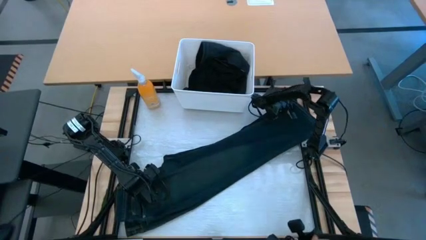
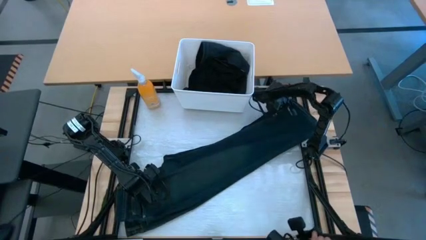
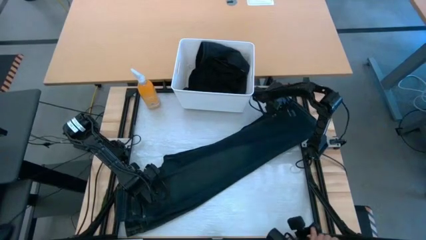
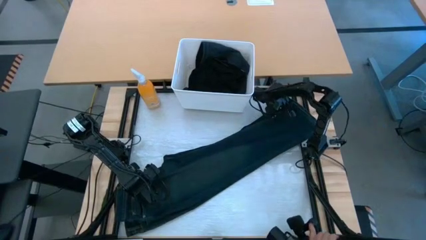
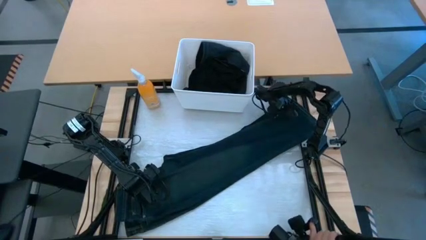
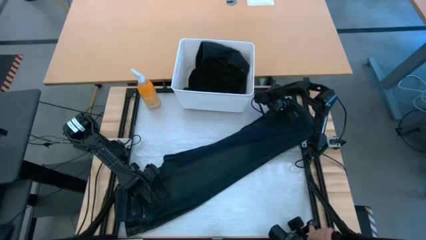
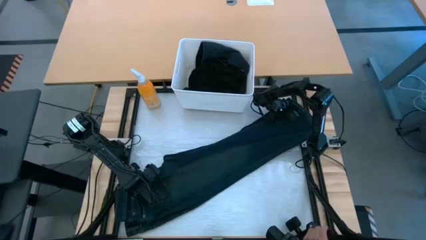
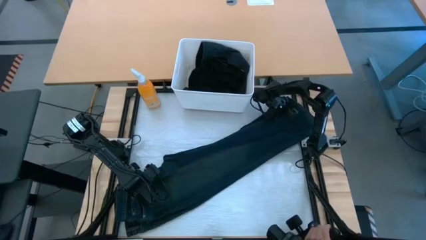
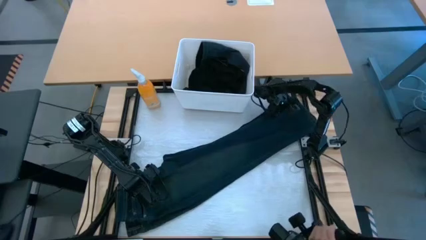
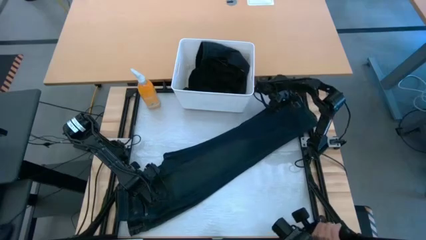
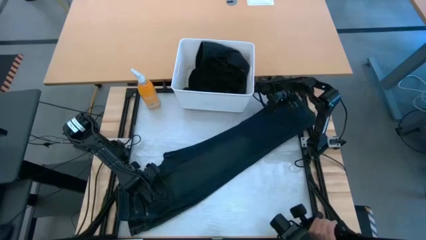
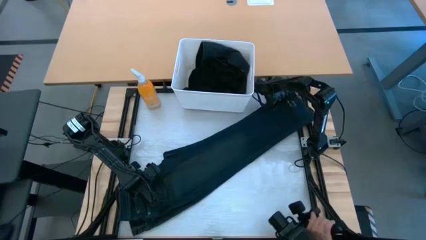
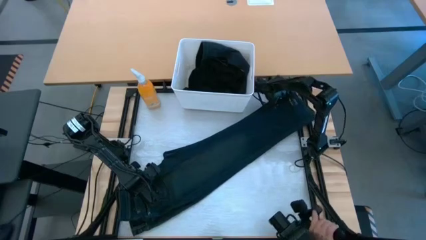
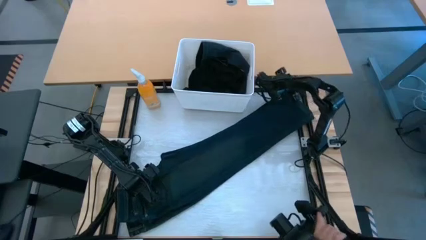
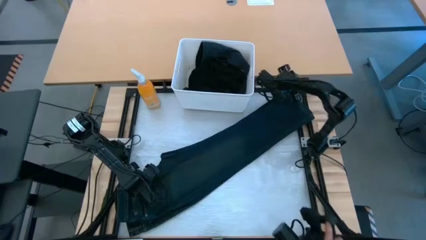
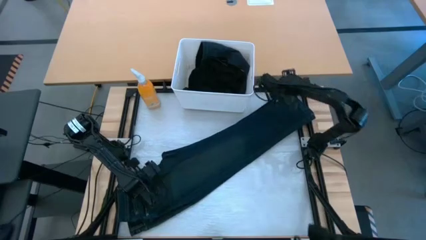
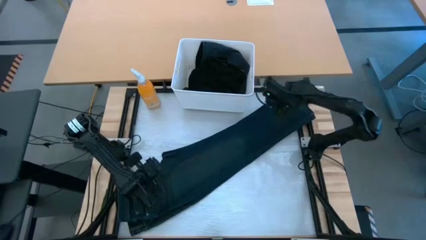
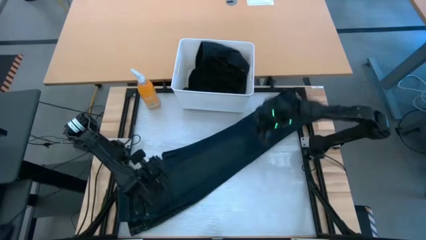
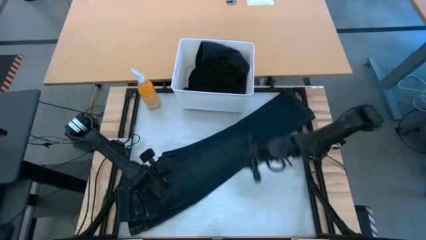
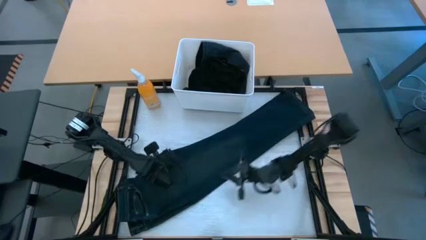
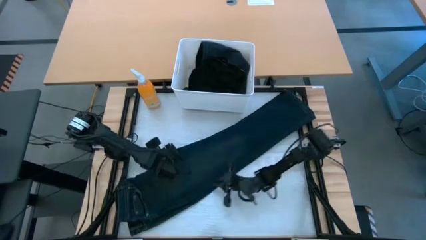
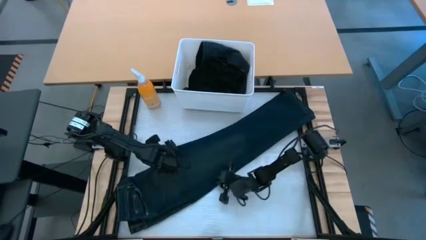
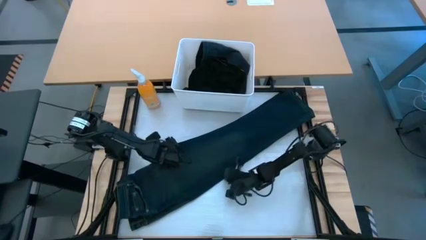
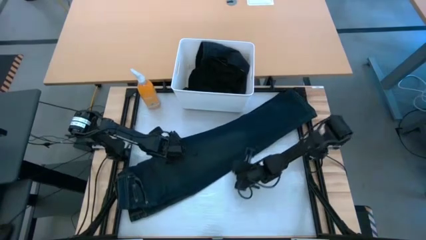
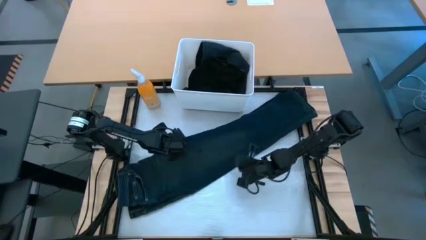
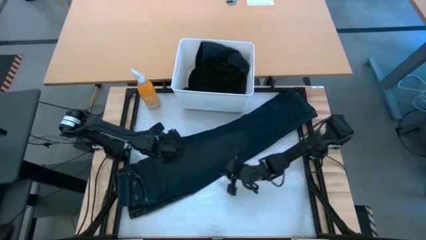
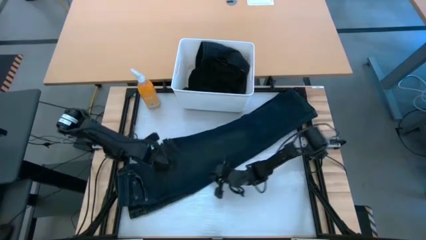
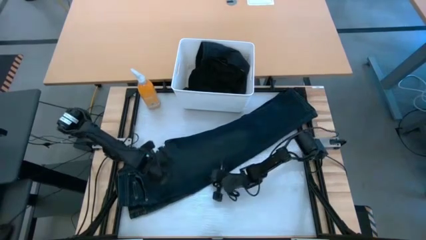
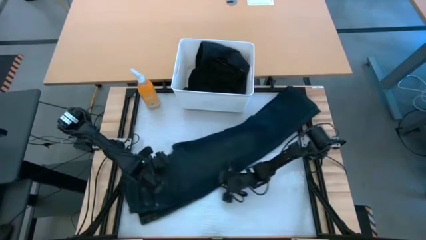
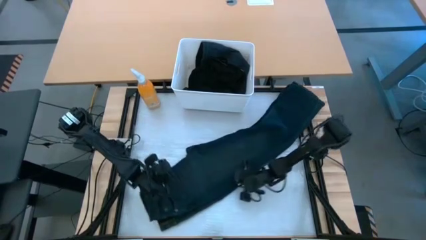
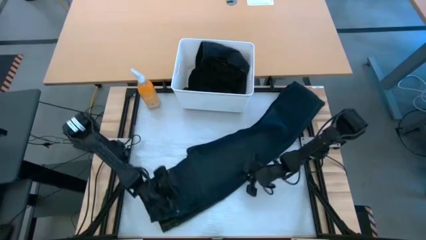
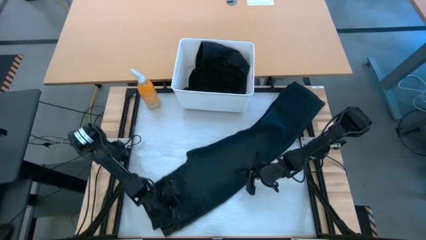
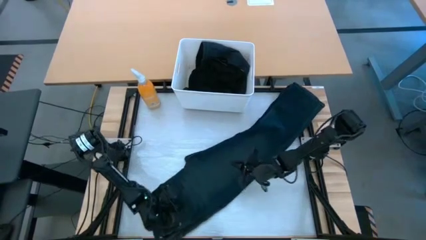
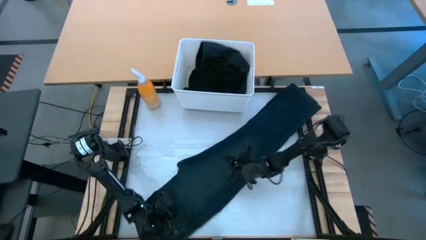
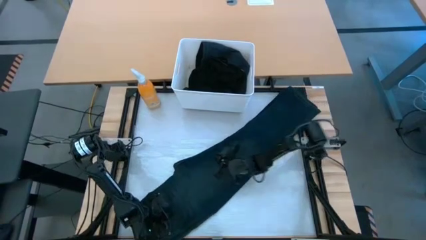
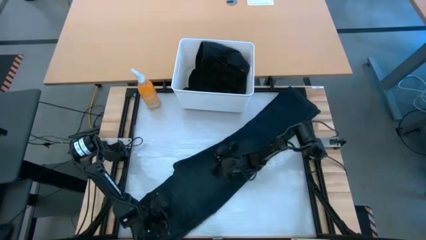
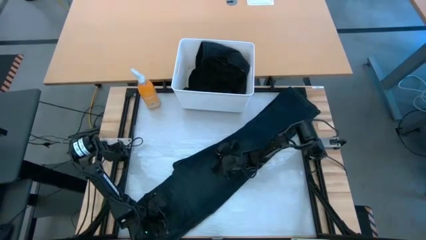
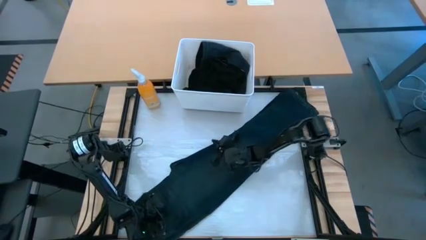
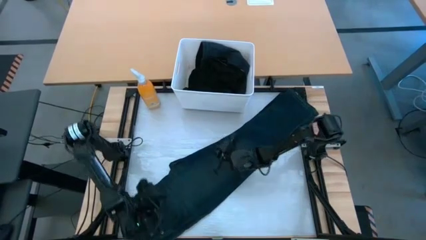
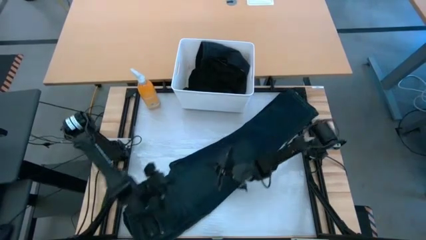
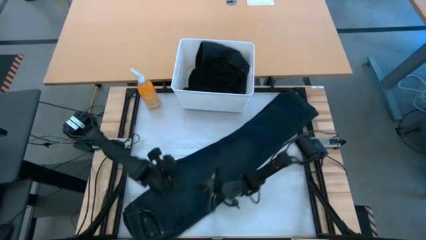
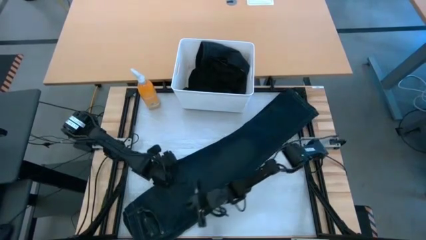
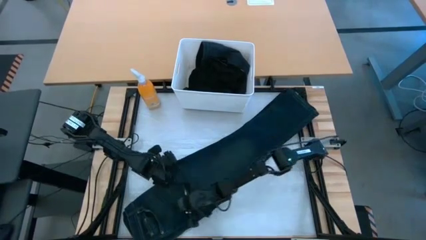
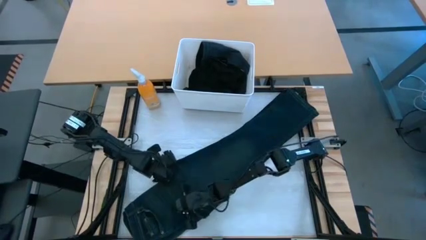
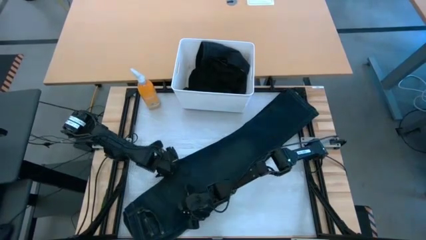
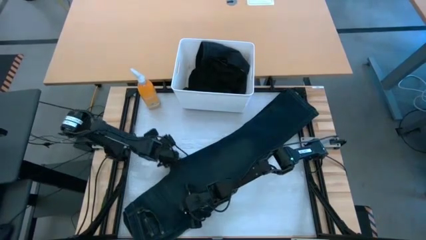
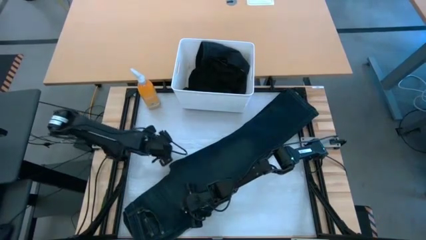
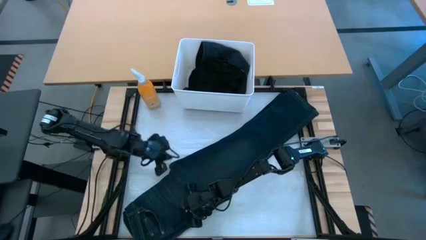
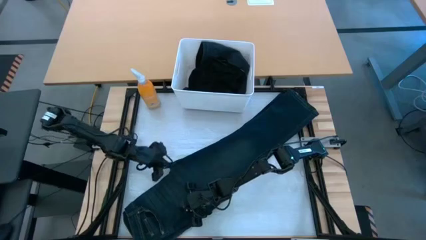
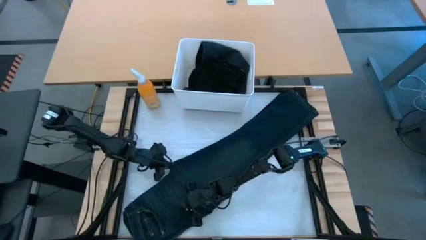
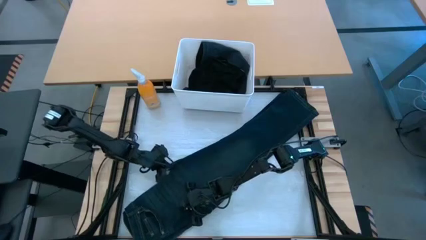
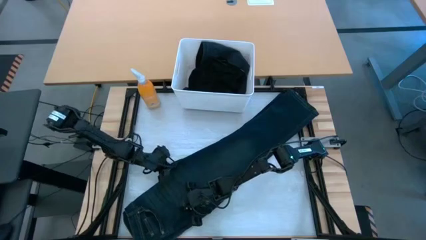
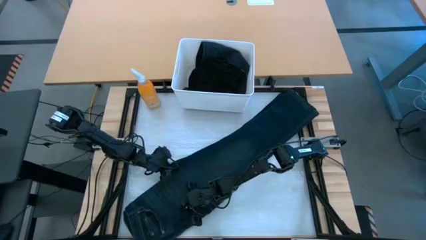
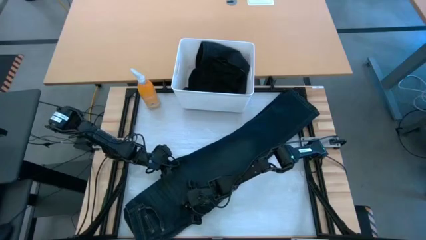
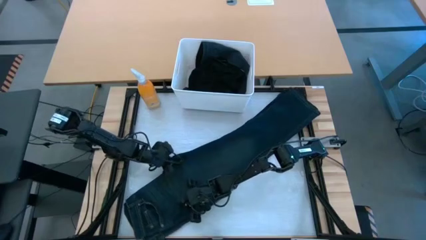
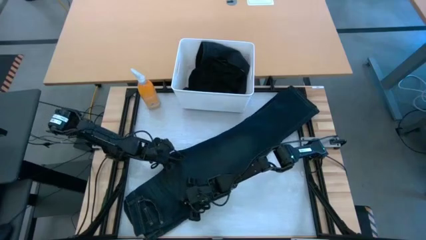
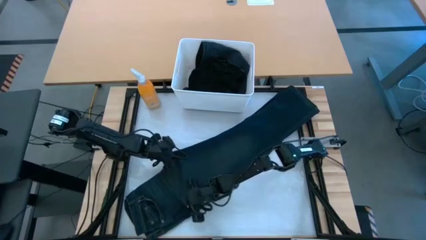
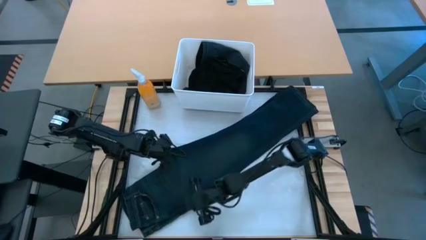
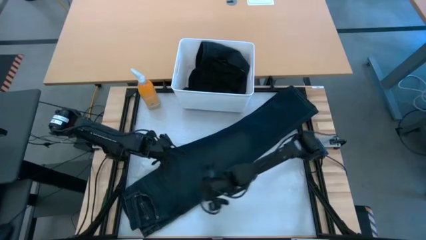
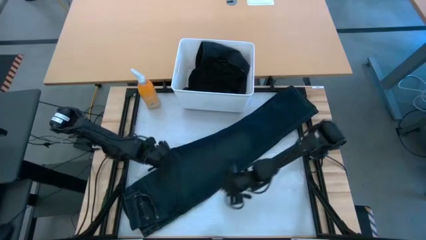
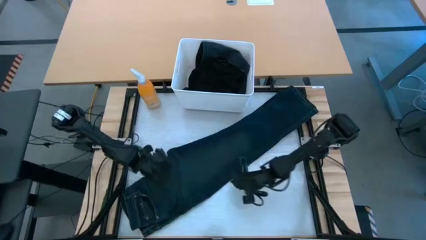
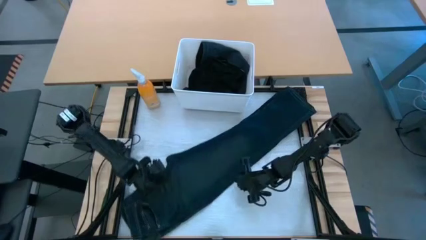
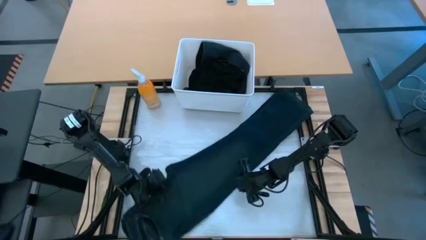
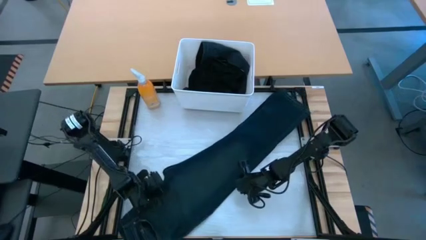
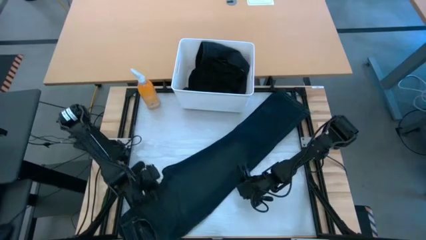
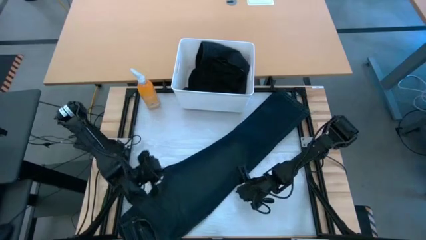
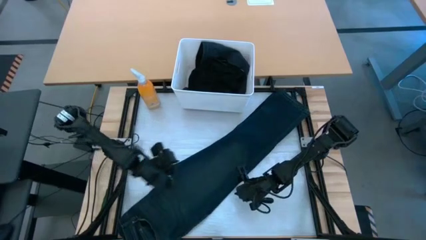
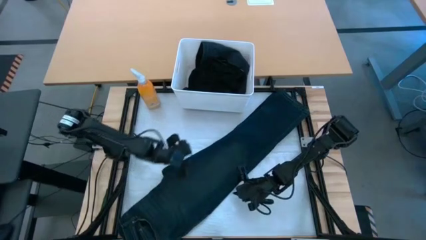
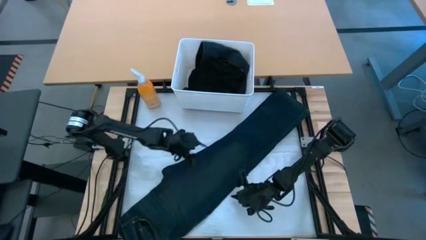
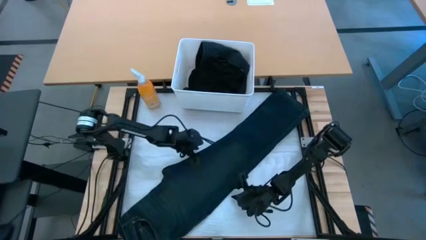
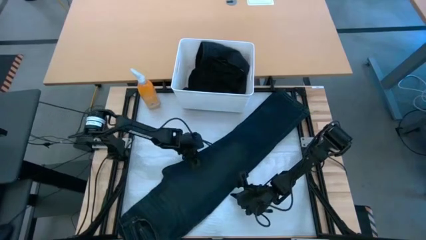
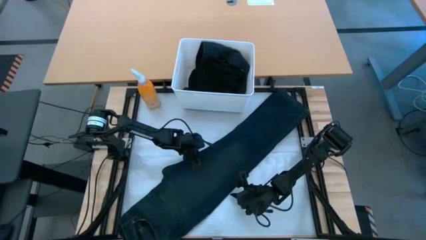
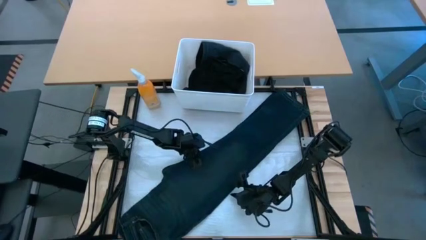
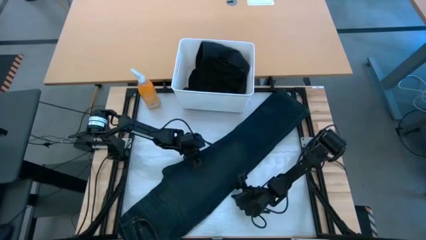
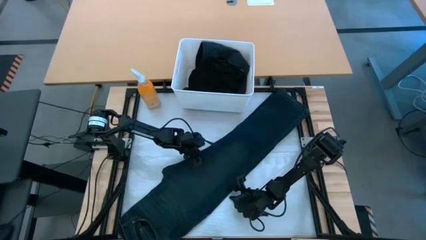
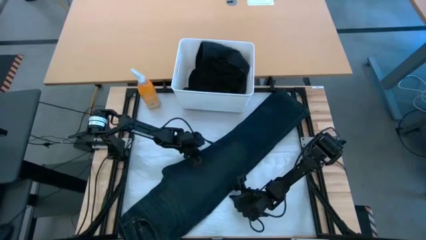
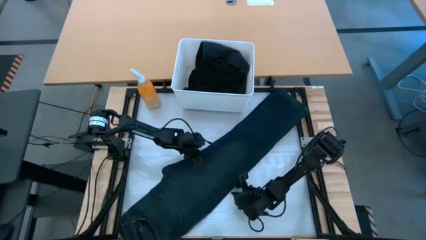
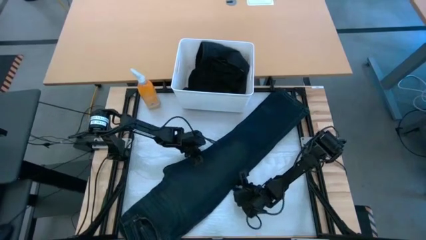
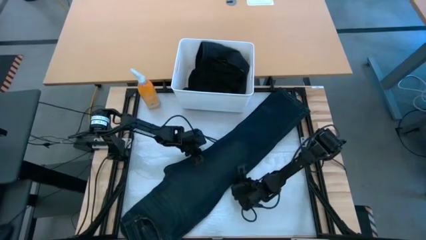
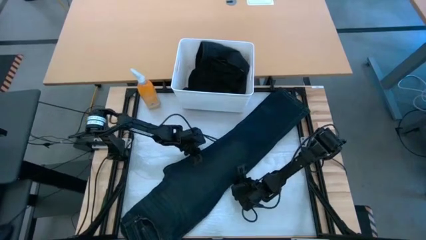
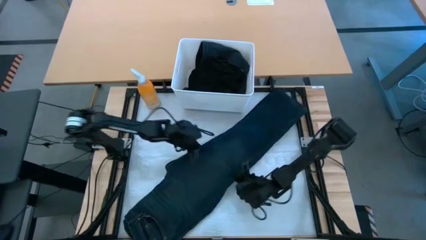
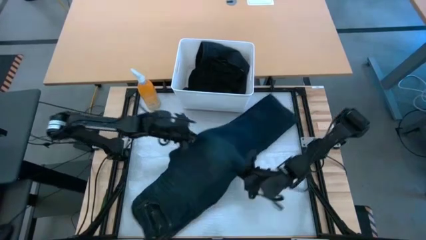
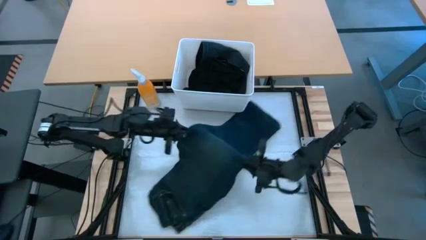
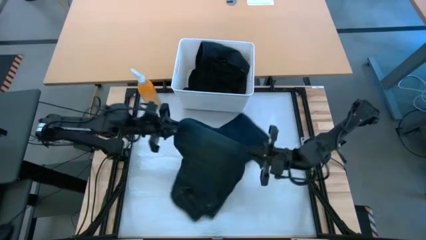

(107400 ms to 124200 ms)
Task: Fold laundry
Fold the blue long pants

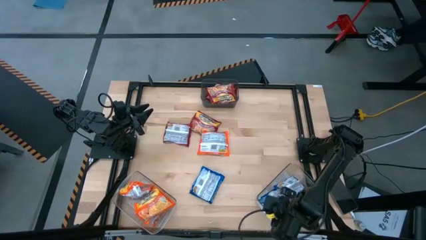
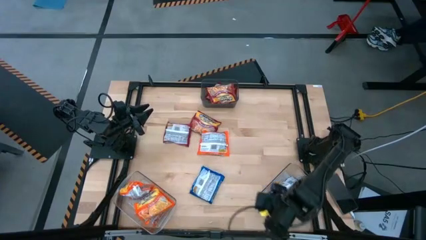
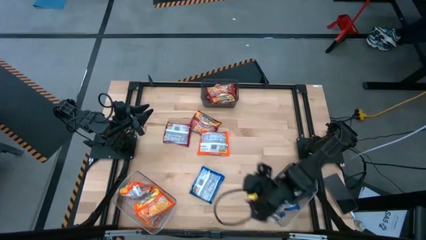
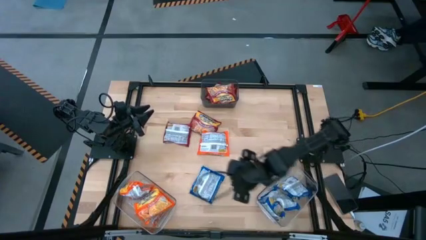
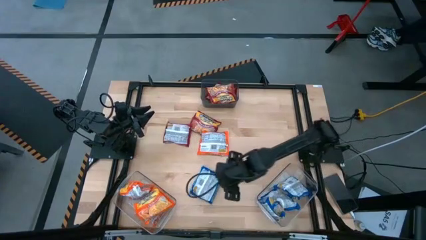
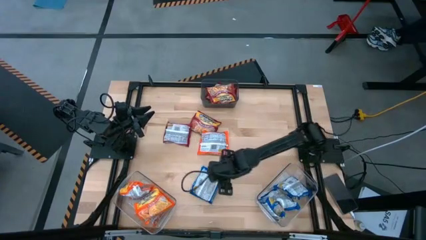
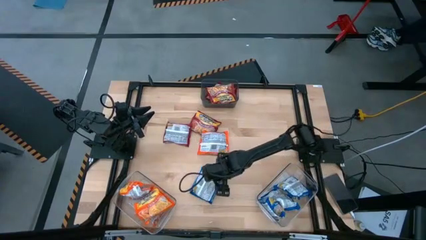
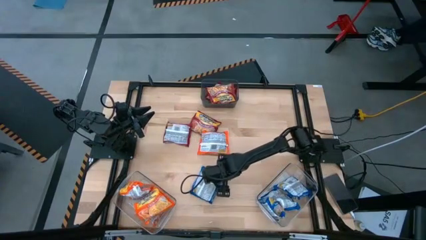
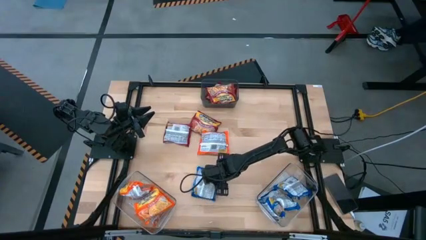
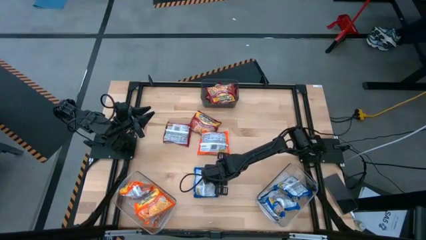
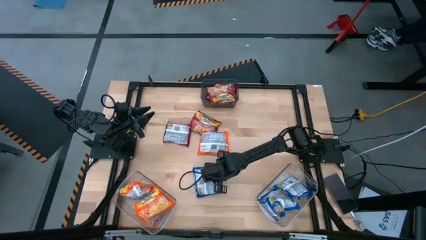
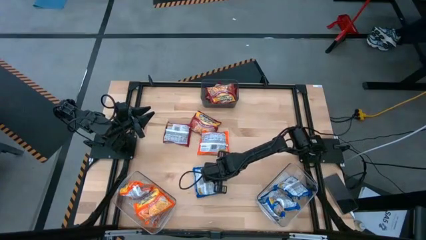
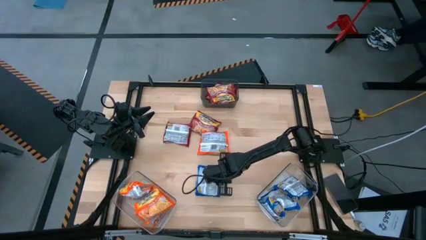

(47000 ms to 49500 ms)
Task: Sort Maruchan noodles
Put the blue noodle pack into the right transparent bin
